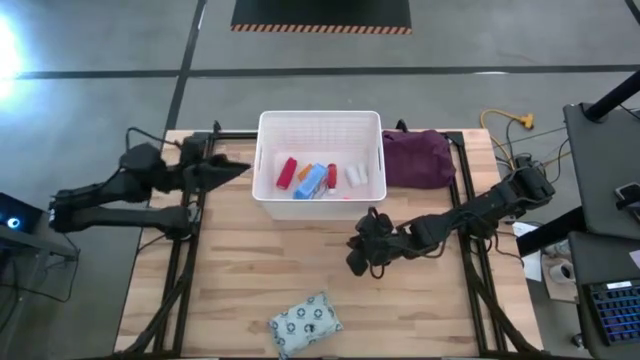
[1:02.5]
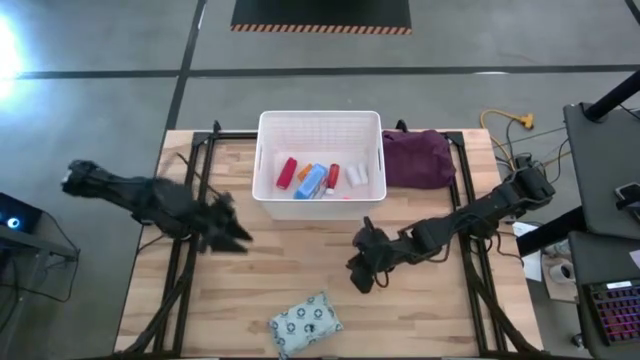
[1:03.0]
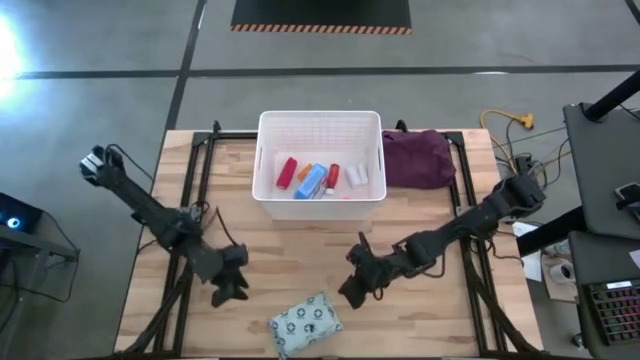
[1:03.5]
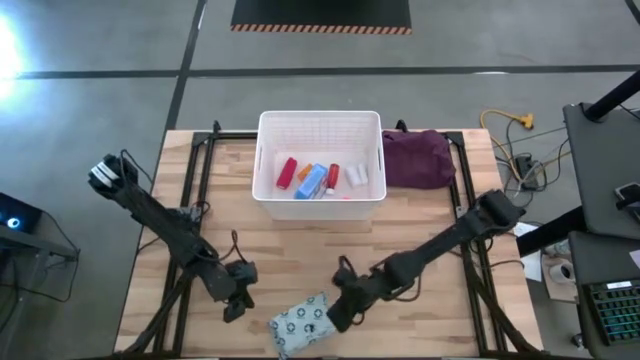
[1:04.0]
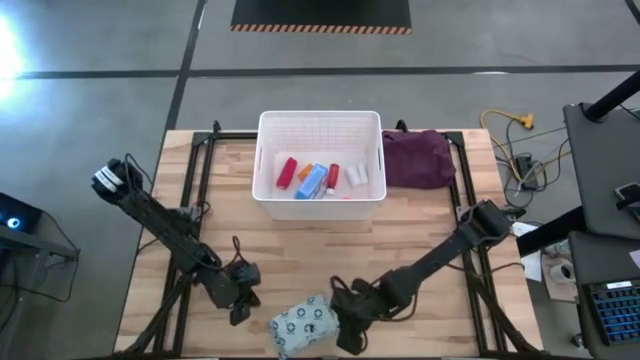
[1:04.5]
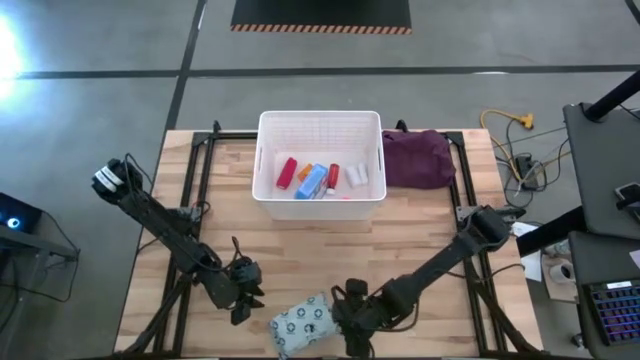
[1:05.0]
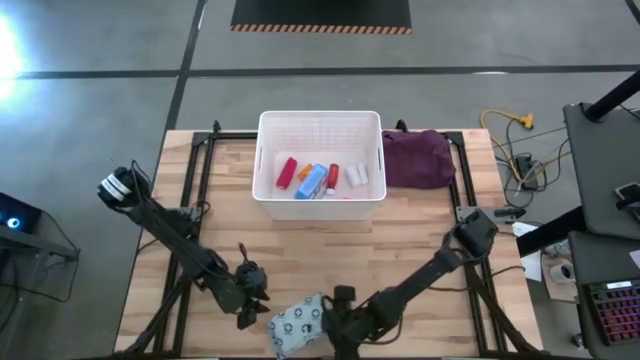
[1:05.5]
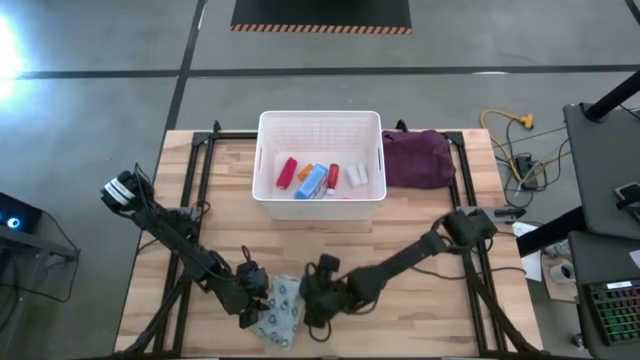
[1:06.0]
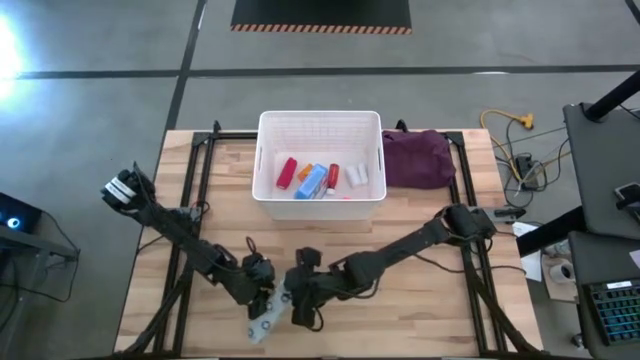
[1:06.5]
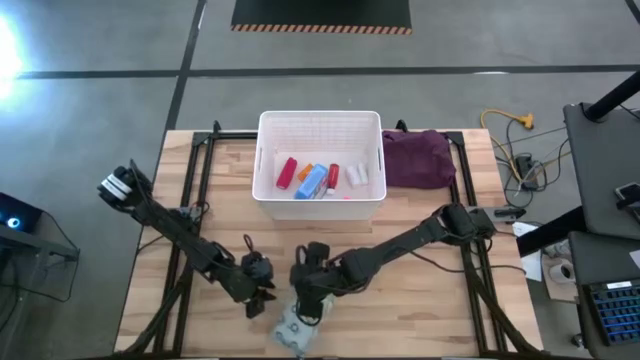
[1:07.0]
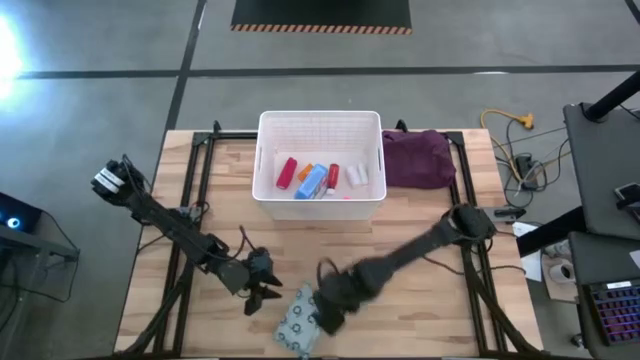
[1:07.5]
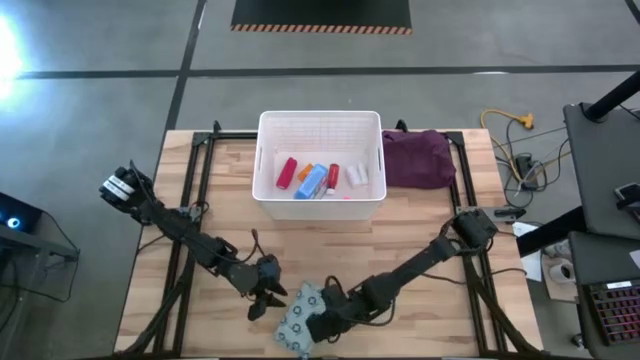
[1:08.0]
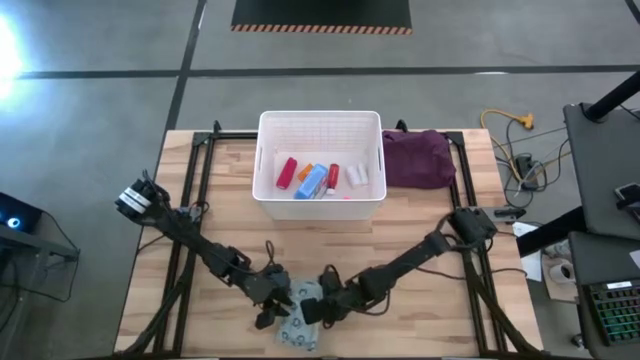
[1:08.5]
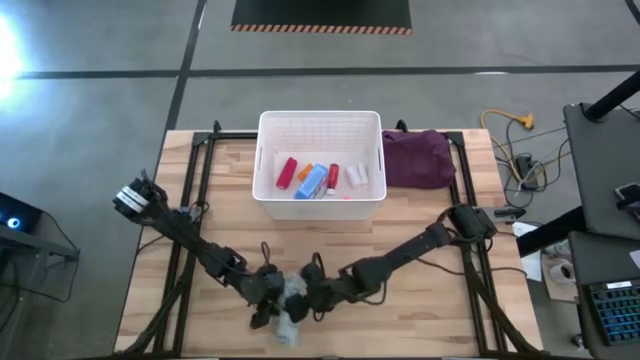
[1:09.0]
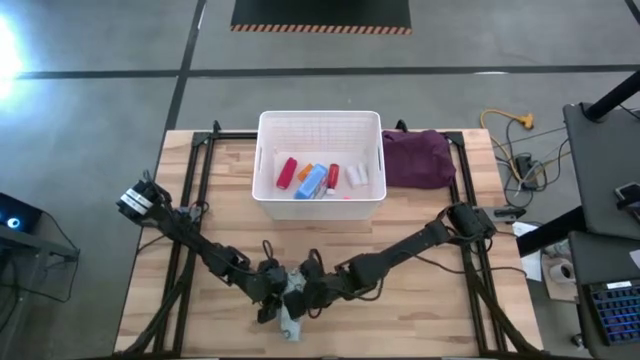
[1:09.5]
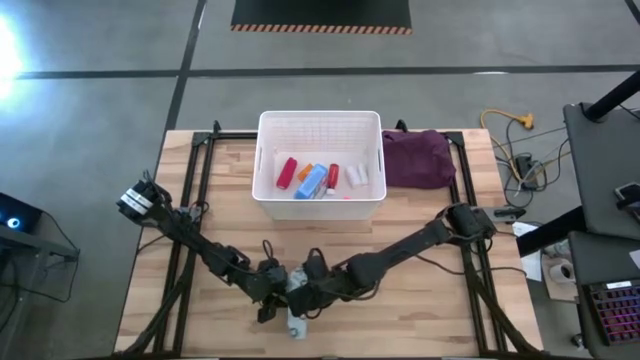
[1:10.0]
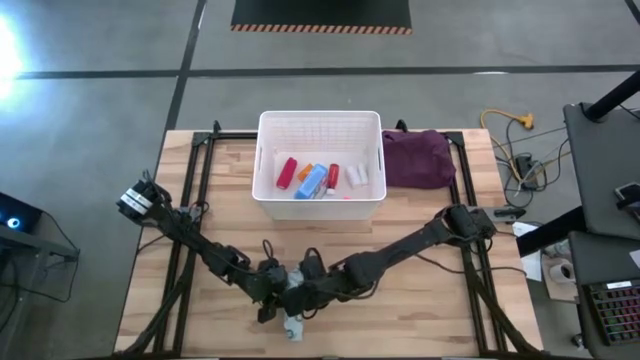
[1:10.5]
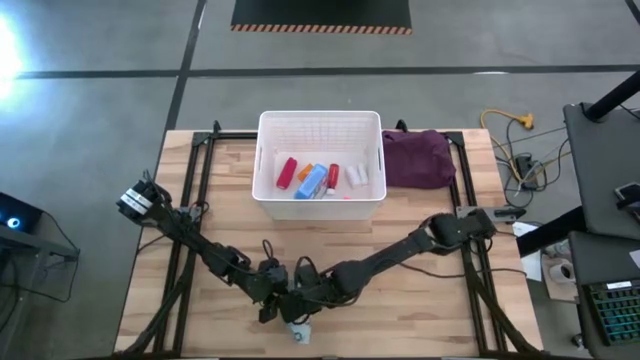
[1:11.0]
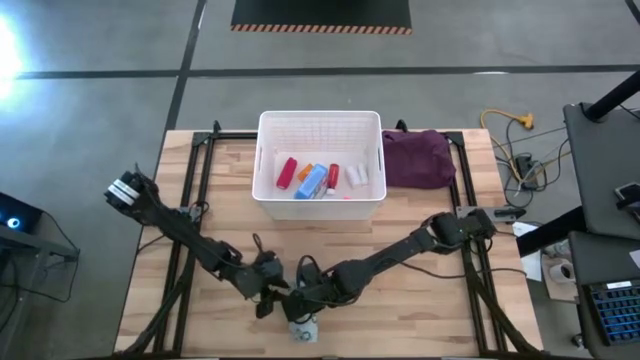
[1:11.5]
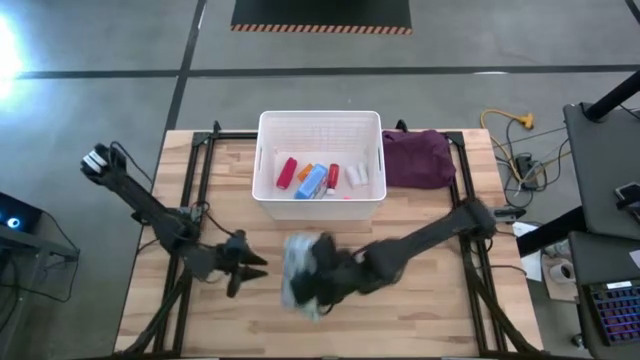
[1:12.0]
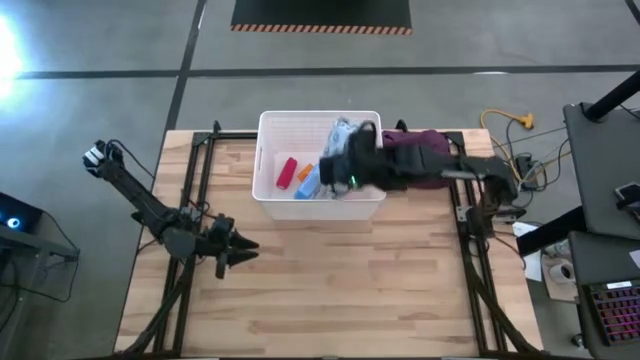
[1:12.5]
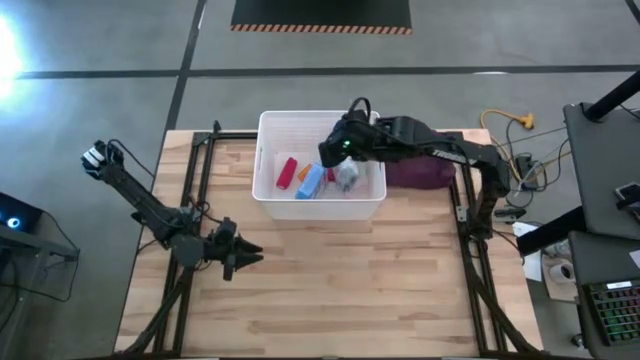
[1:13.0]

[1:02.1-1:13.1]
Task: Pick & place medical supplies in basket/bin
Put the mailer bag into the white bin

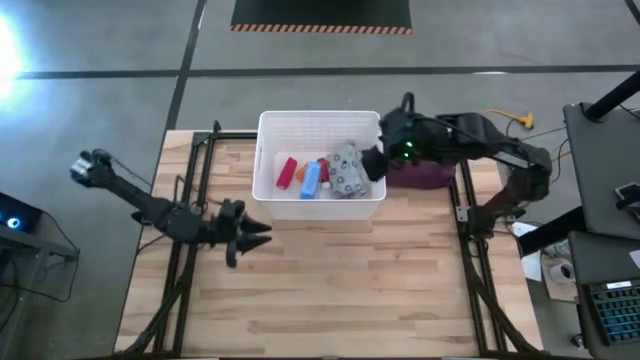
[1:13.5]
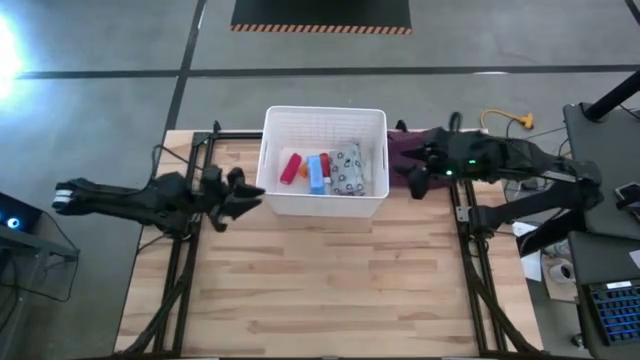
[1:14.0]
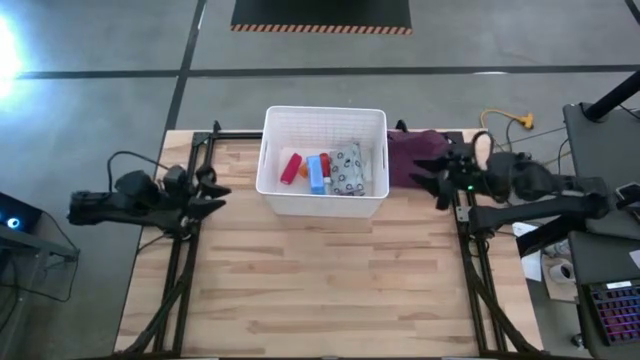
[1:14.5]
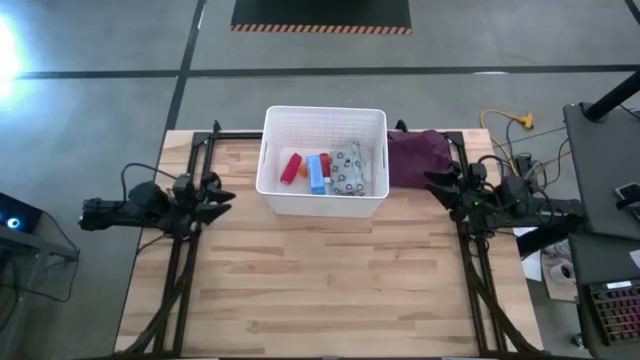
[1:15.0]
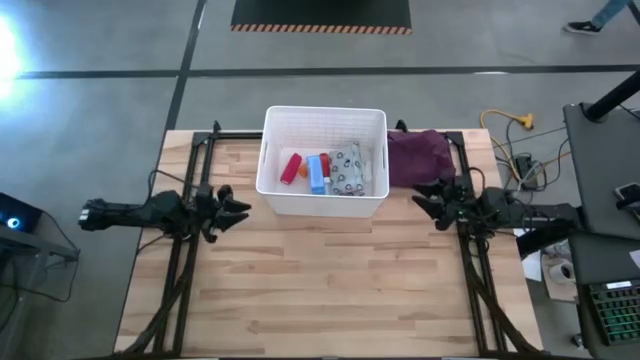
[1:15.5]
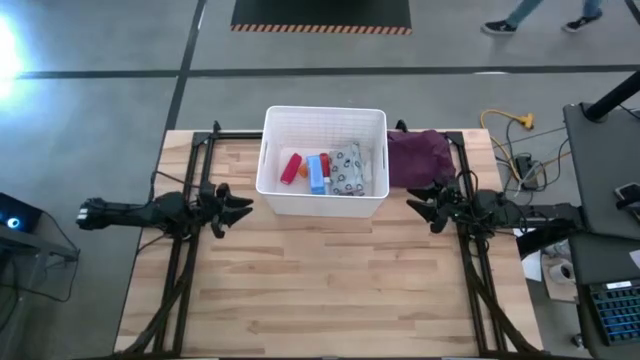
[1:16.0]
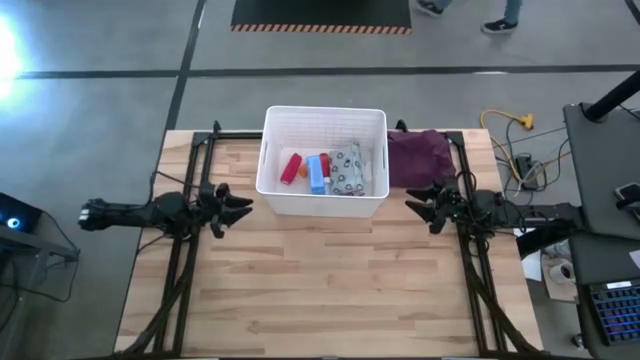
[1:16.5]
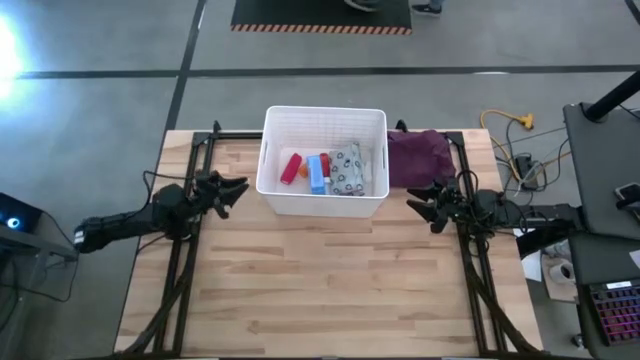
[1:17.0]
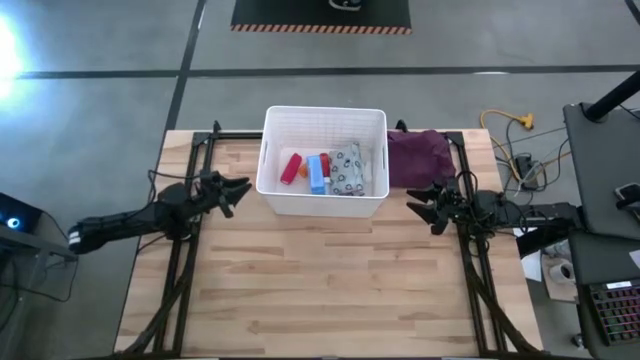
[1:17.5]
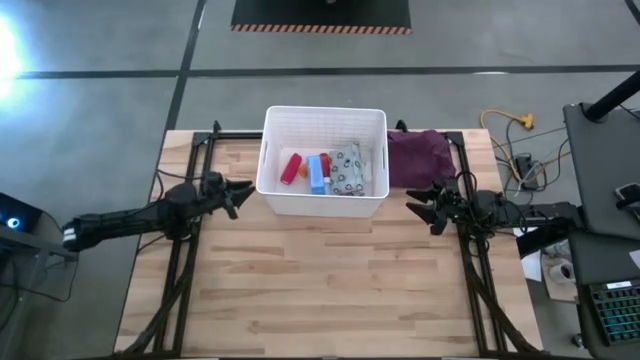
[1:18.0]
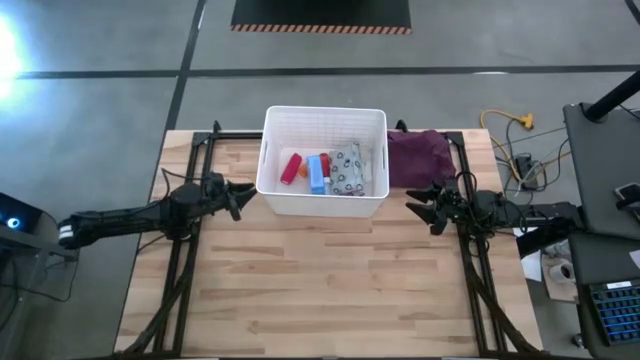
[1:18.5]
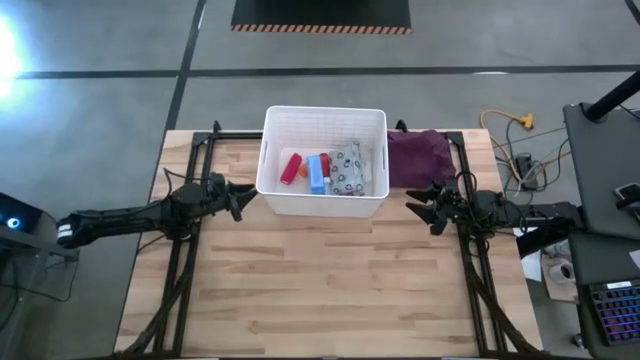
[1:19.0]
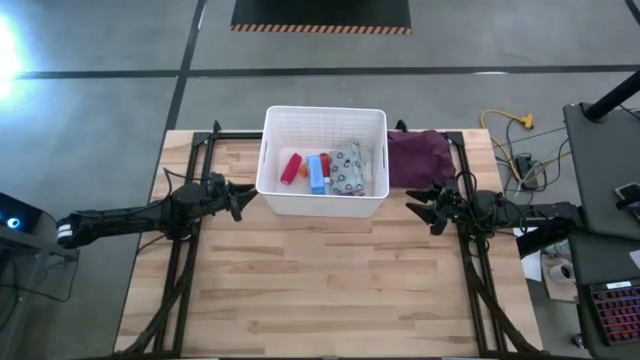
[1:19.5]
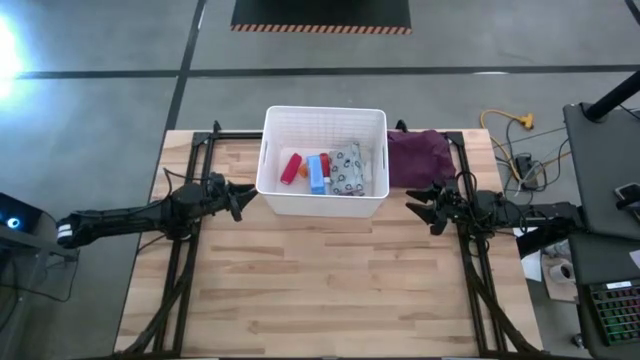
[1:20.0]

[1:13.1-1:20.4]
Return to Home Position

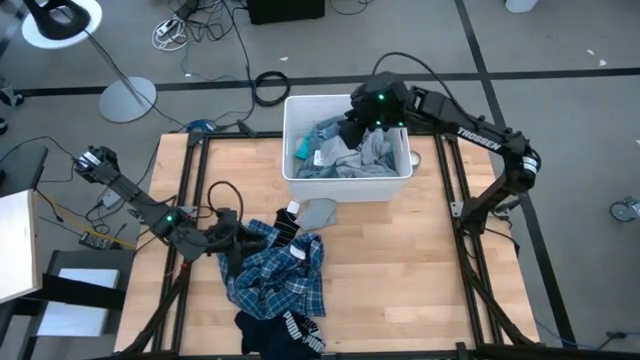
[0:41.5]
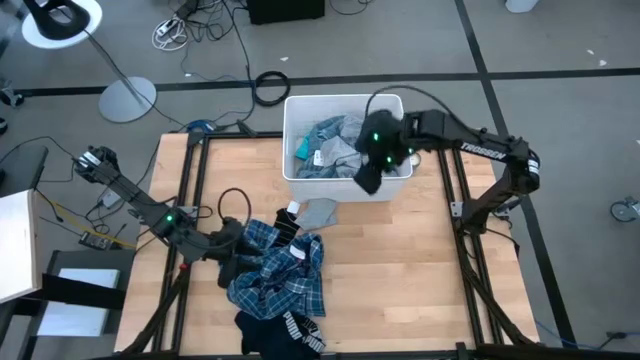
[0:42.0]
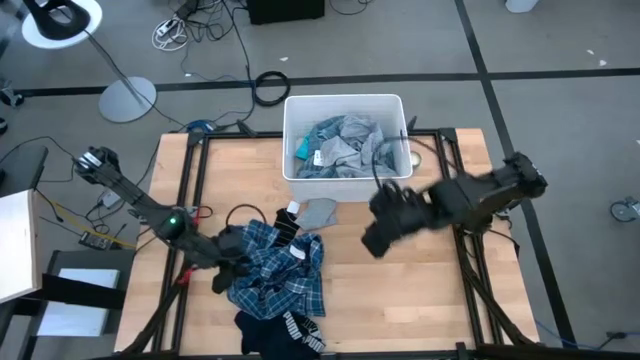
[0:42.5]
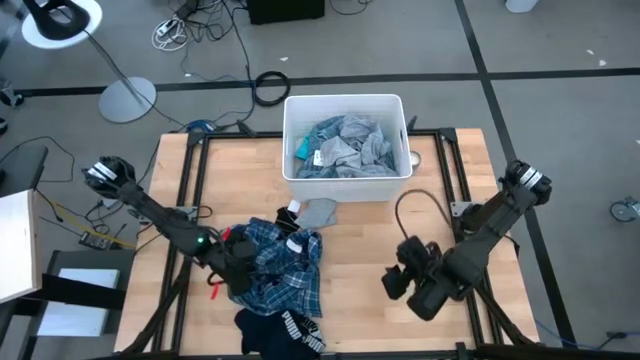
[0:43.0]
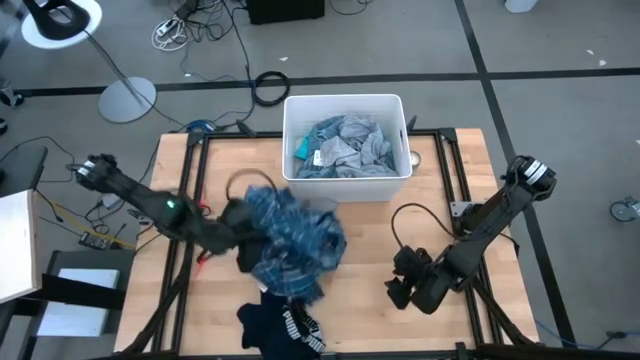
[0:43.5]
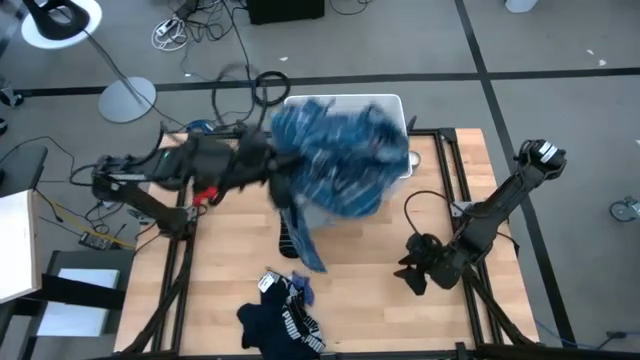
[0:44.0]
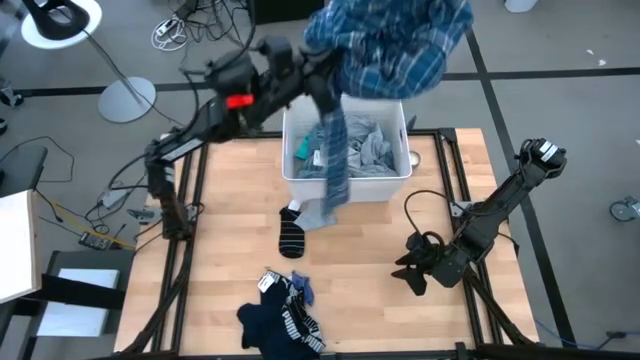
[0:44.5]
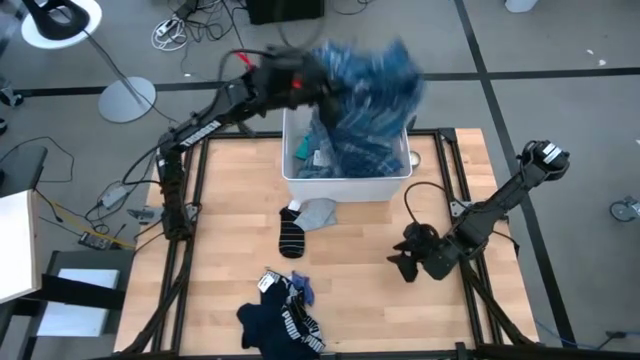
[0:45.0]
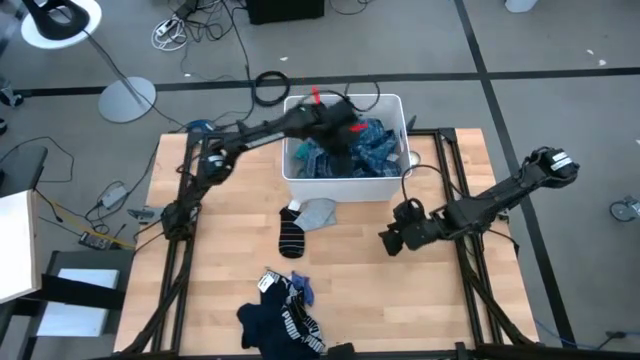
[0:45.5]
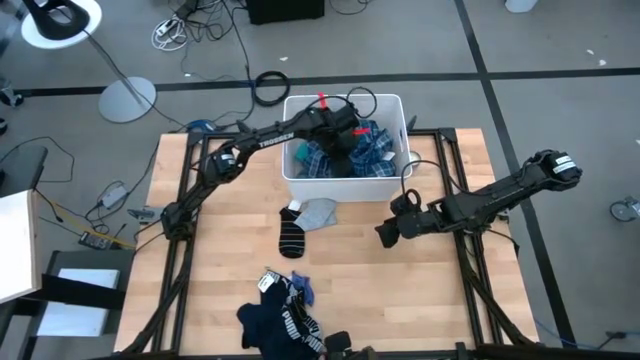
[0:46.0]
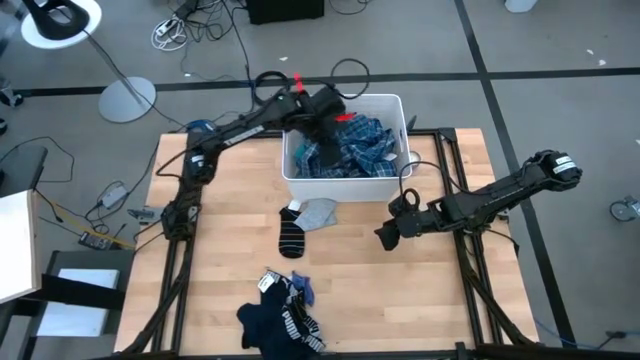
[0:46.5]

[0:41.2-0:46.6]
Task: Sort clothes
Put the blue long-sleeve shirt into the laundry bin
